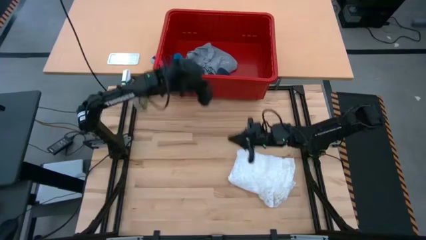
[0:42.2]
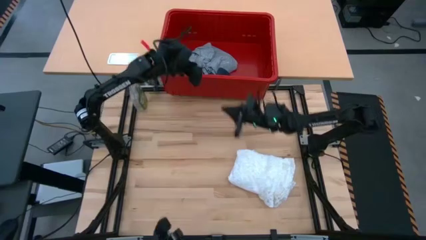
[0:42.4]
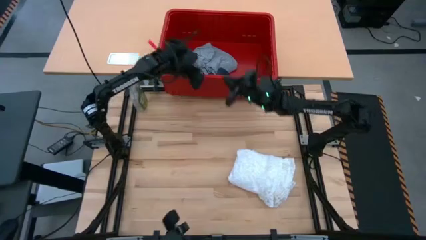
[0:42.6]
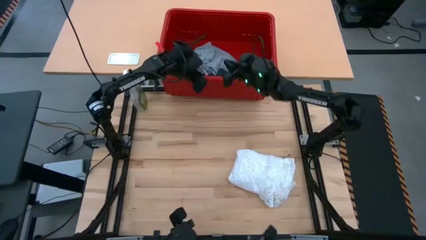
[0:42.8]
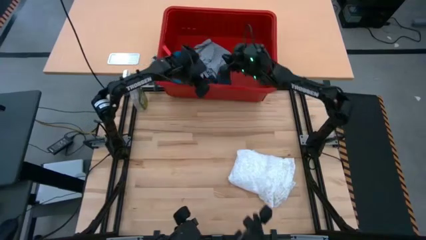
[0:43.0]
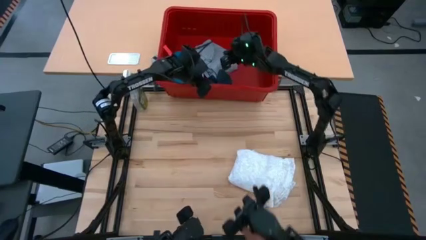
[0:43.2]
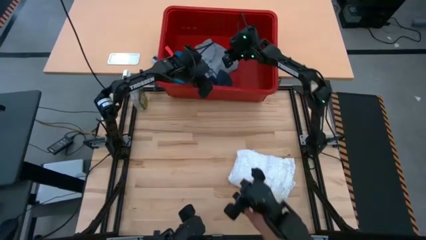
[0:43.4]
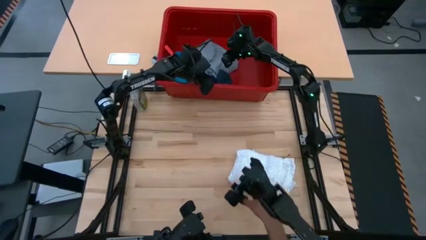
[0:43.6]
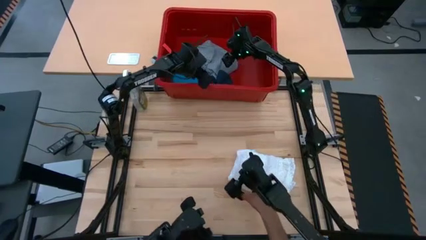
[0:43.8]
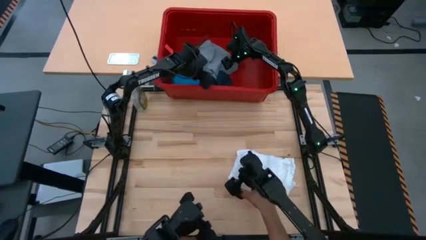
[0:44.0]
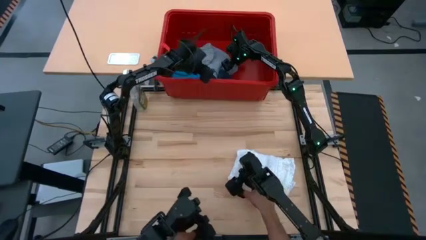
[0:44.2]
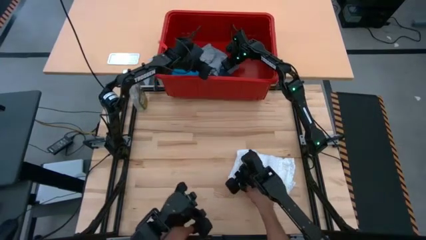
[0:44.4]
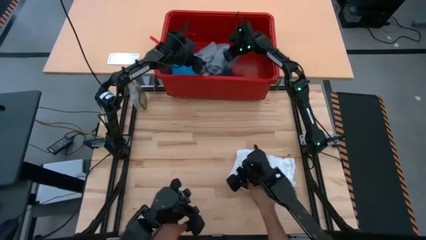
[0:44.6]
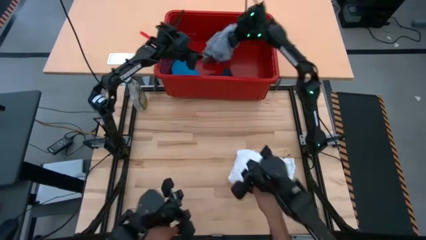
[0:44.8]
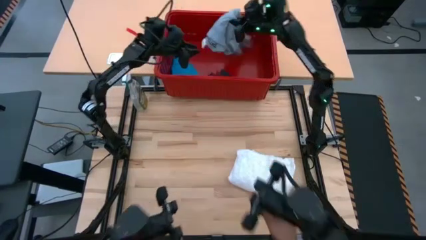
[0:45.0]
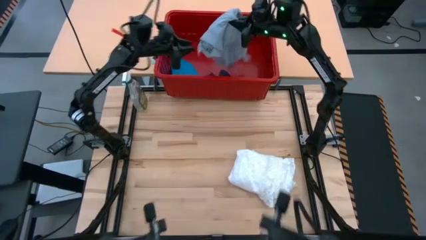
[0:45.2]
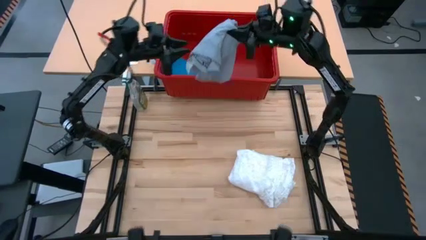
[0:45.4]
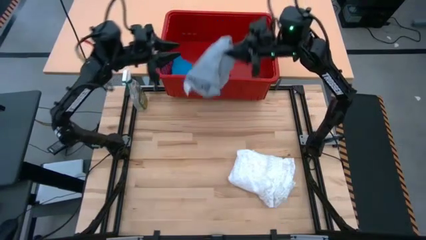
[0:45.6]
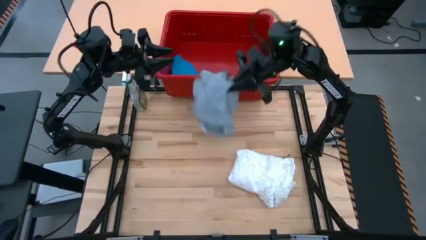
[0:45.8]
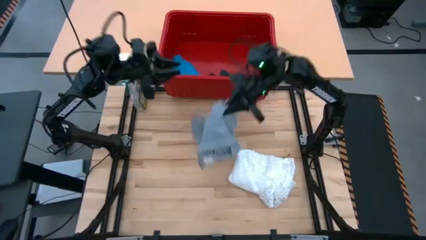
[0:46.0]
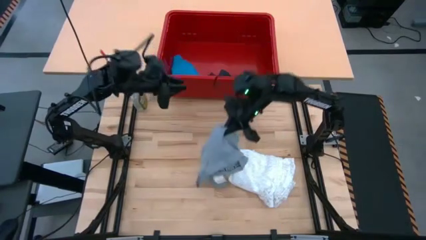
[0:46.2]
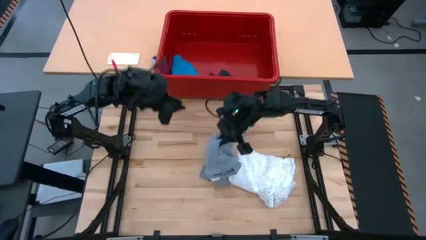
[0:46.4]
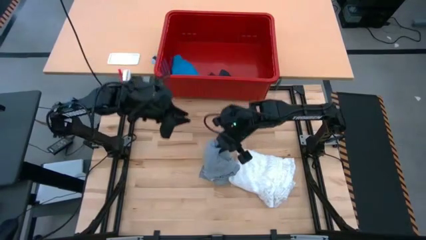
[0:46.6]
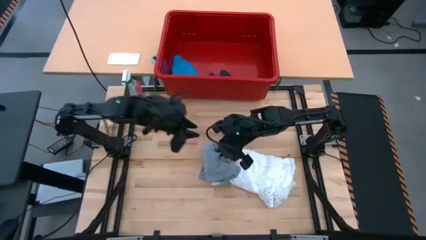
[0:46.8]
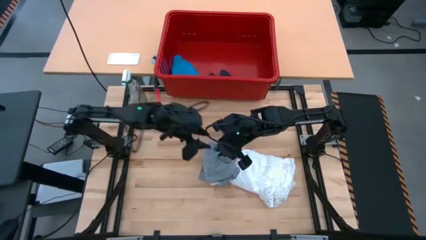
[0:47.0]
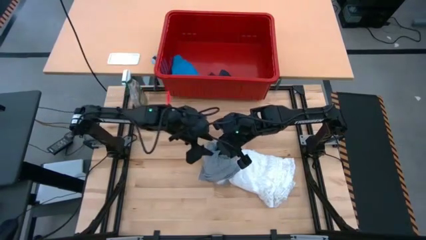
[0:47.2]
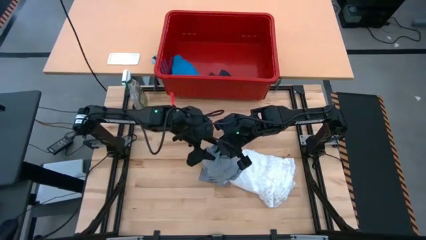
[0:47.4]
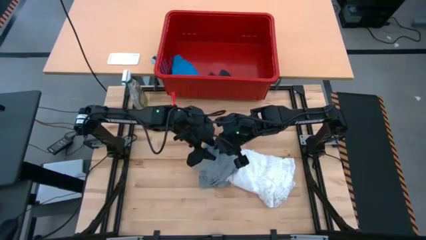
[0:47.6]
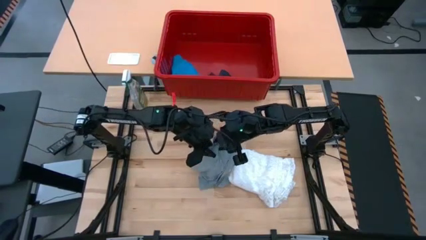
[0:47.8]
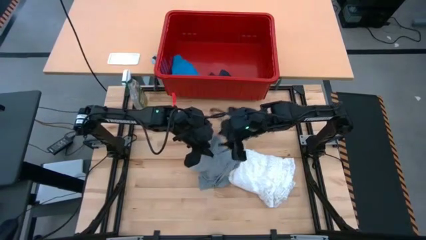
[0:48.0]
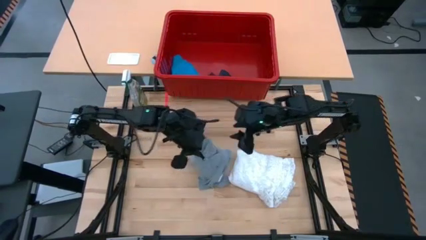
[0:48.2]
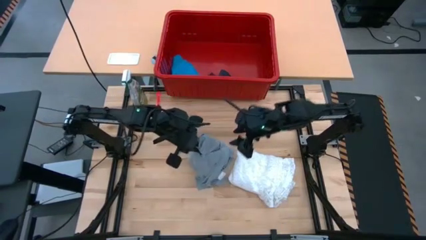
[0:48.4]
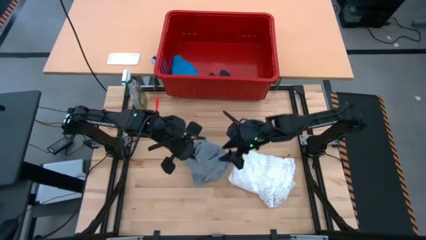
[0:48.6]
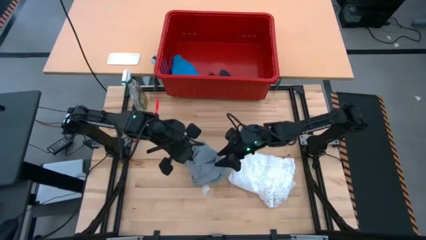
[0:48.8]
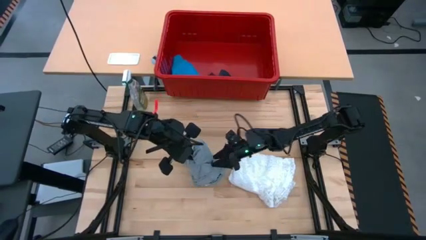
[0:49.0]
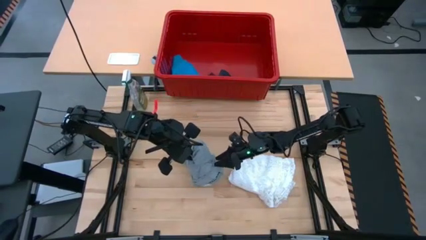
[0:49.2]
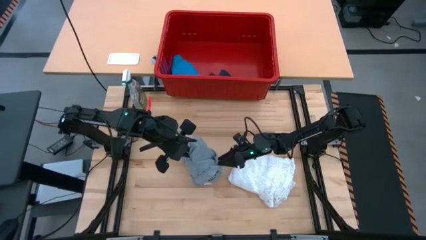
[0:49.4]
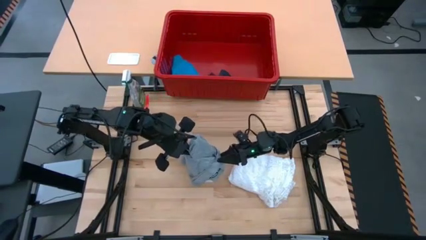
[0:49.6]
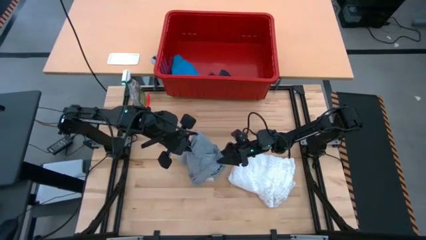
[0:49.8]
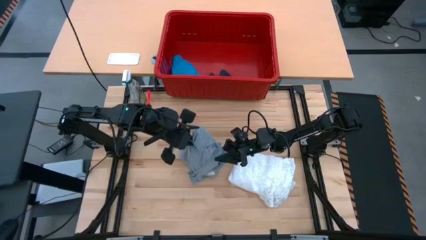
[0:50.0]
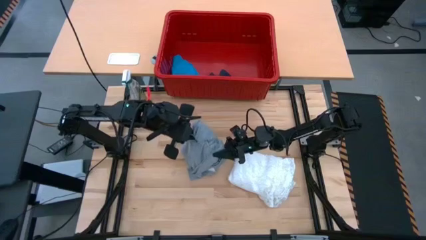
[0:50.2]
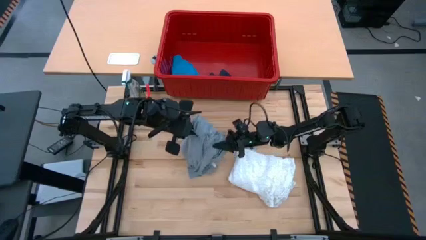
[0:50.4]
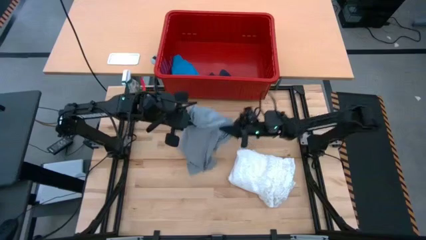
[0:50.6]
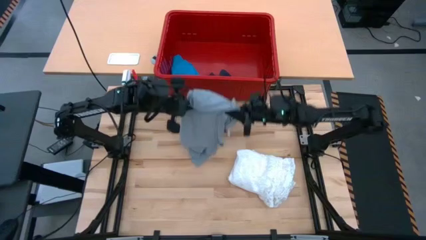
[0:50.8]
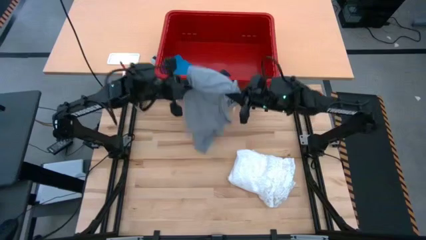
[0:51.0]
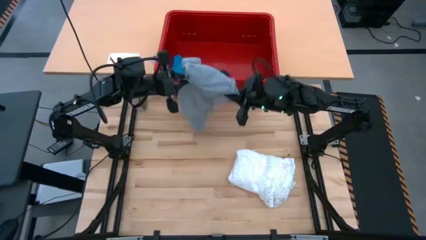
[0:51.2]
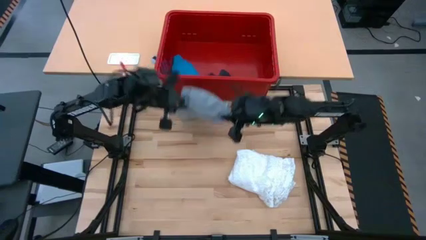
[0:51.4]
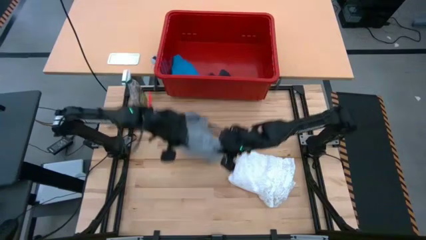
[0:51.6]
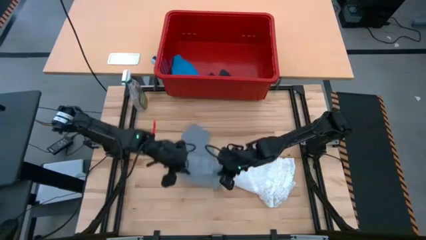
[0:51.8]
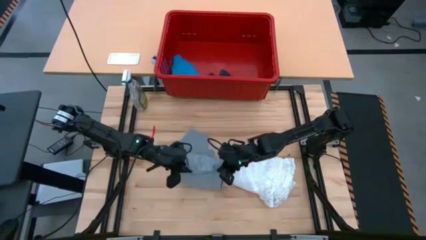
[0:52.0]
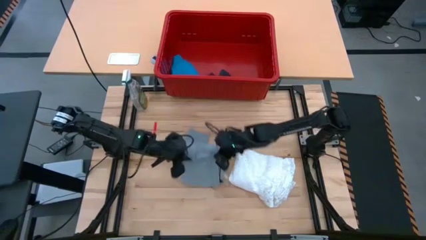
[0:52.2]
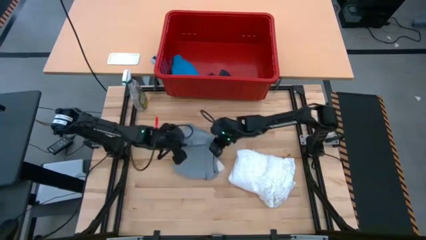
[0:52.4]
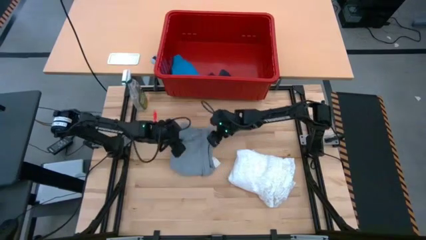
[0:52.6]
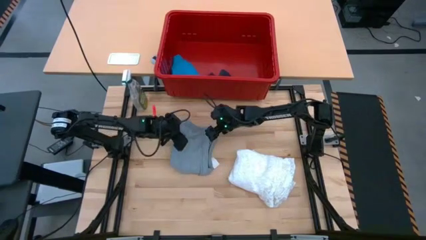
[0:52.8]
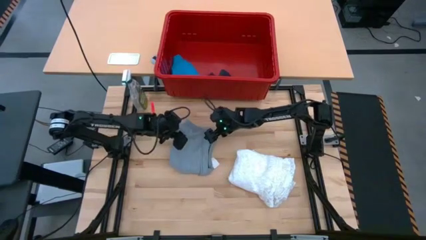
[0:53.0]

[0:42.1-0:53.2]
Task: Fold laundry
Remove the gray shirt from the red laundry bin

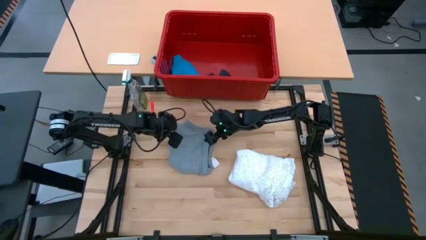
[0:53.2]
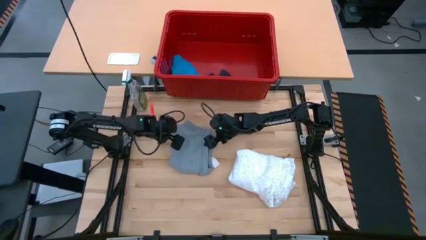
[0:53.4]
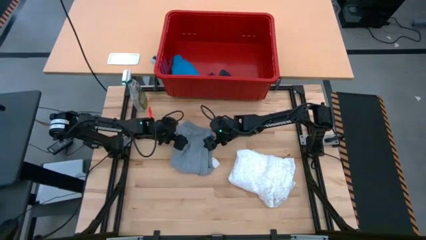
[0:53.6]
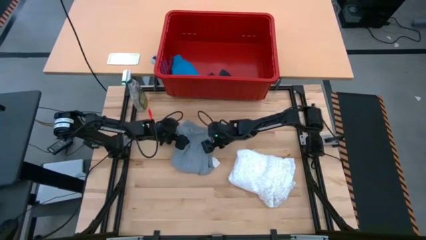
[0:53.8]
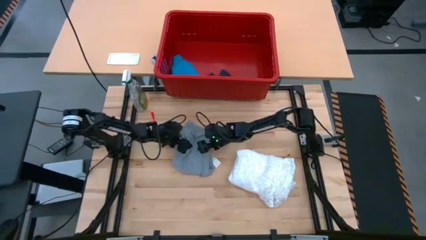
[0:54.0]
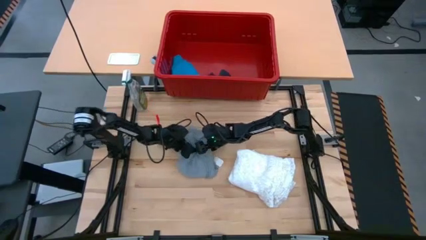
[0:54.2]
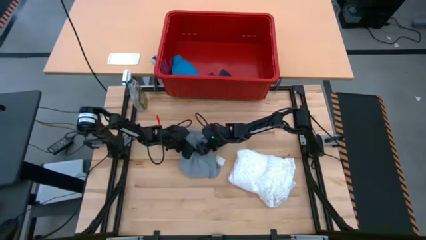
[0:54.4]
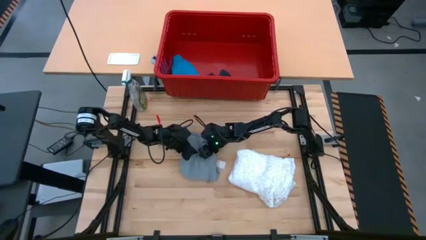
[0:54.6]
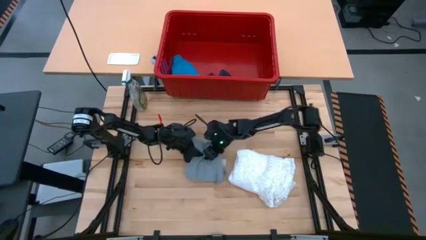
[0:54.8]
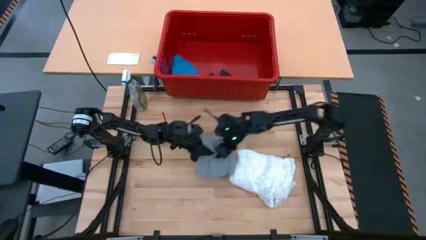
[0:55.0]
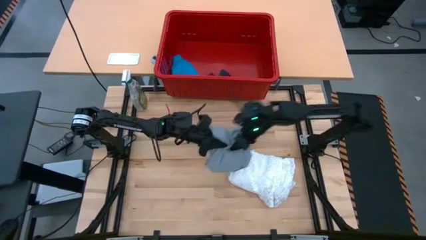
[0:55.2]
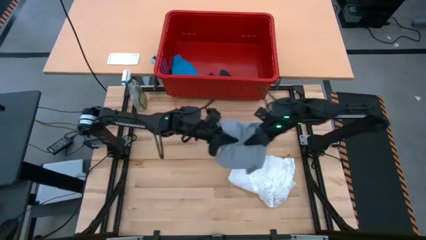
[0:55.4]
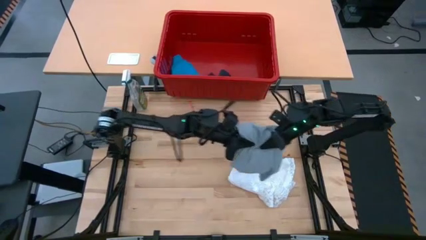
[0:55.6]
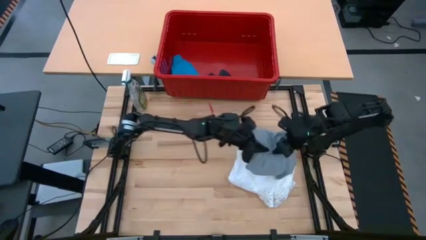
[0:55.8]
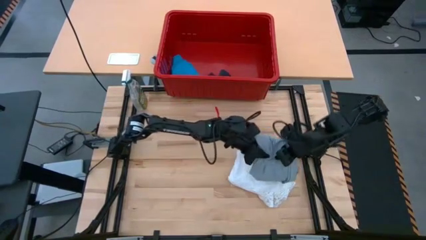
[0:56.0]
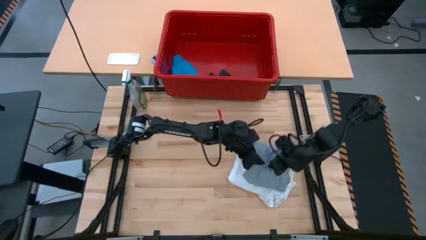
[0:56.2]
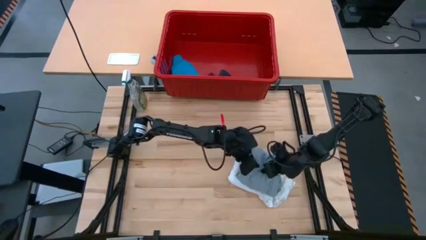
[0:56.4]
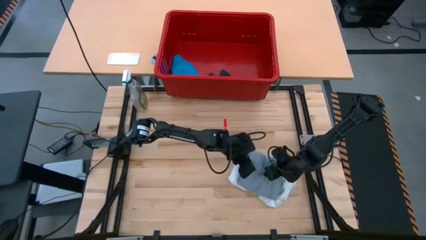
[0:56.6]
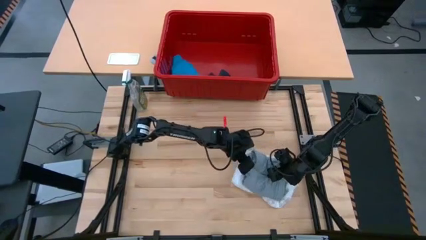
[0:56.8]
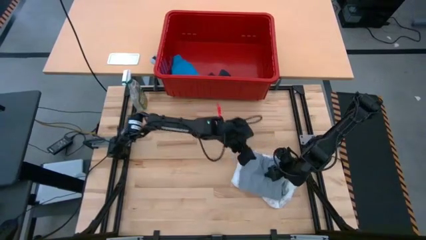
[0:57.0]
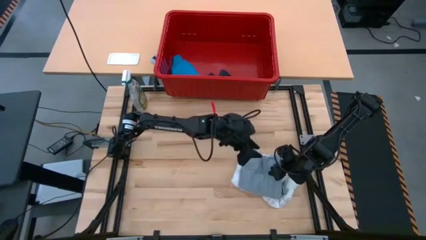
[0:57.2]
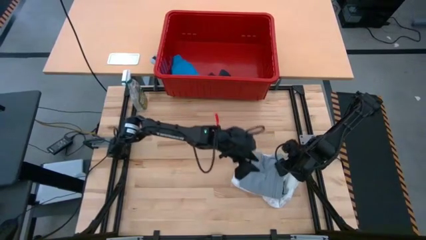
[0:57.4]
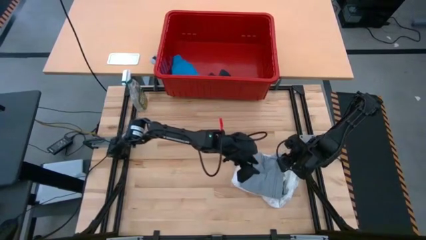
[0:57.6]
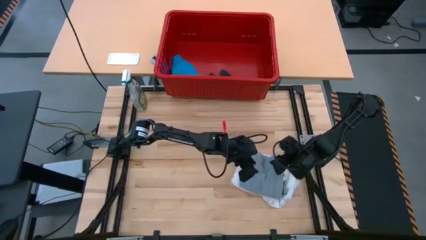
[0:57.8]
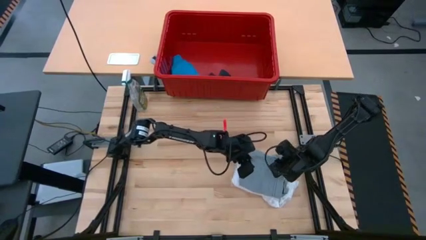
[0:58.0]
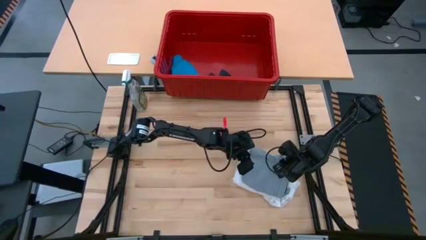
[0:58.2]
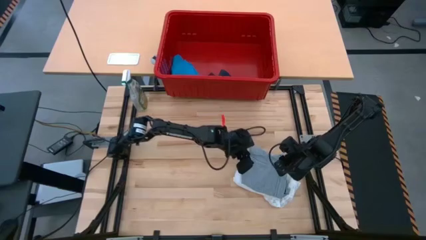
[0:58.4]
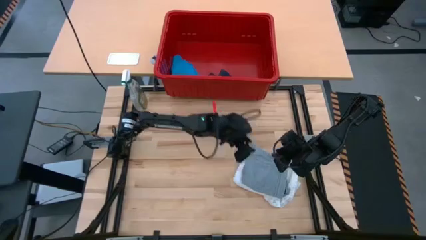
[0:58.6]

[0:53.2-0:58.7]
Stack the gray shirt on top of the white dress

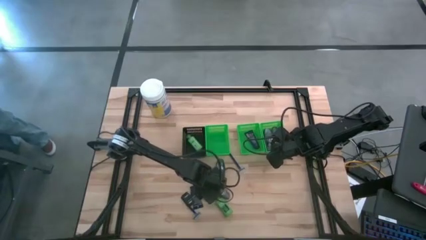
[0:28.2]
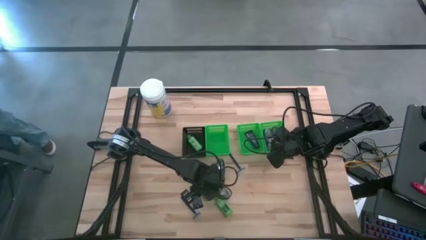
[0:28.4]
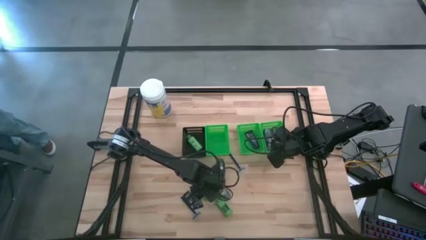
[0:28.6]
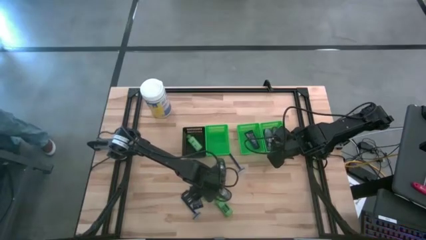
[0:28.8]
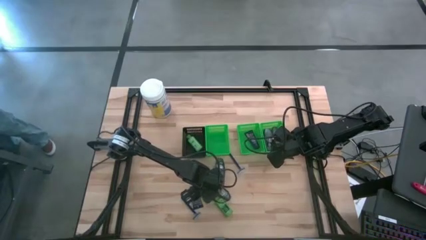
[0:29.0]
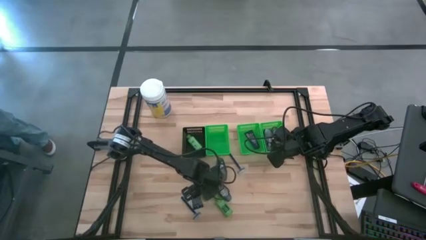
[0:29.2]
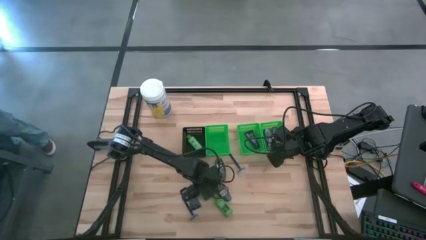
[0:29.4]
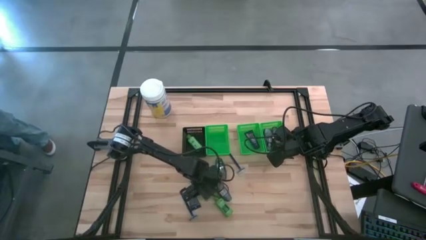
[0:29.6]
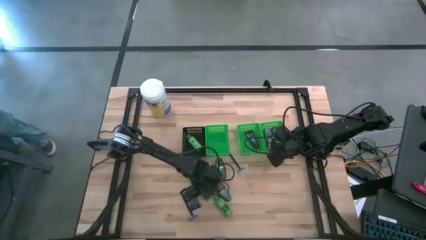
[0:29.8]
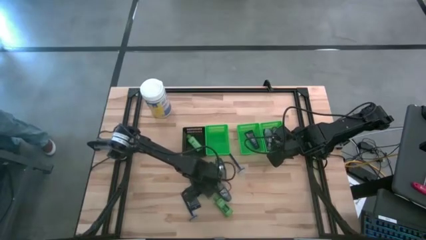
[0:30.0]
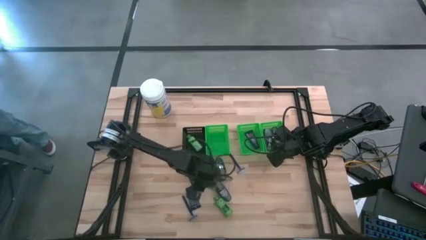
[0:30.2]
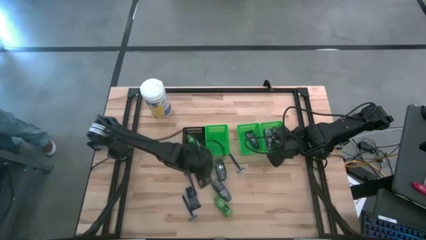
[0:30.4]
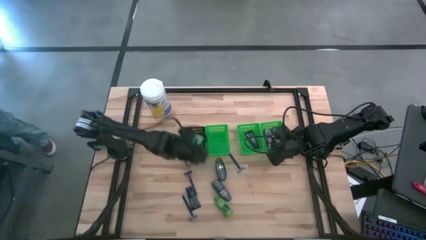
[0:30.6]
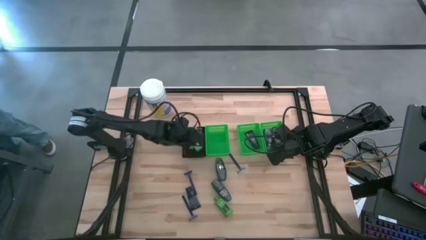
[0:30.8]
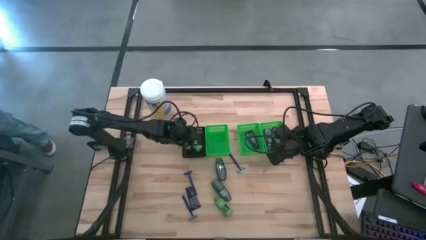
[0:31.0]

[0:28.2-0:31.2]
Task: Pick & Place Travel size toiletries
Put the green shampoo into the black bin
